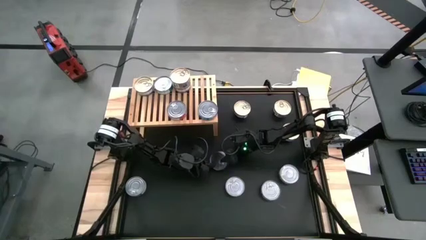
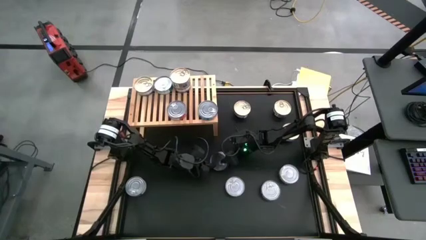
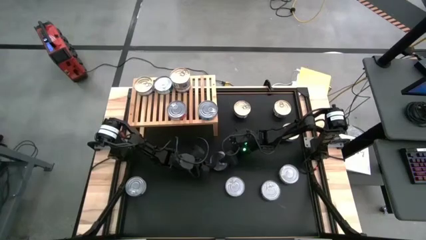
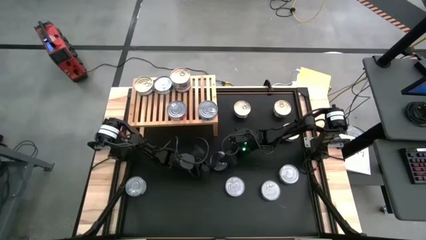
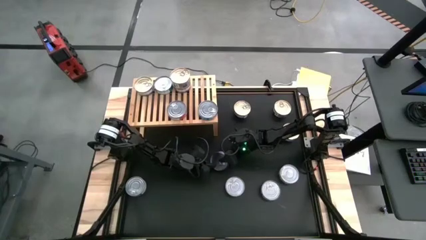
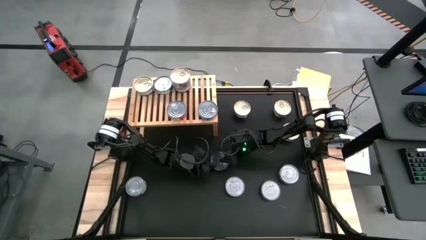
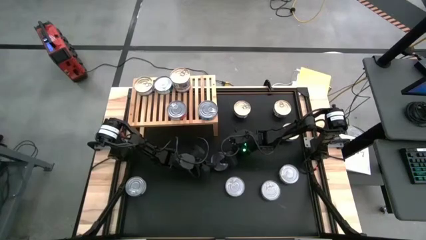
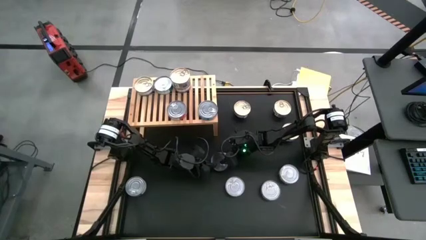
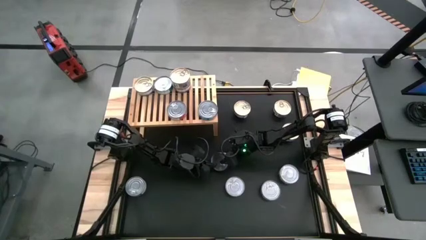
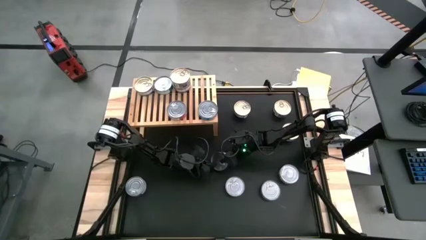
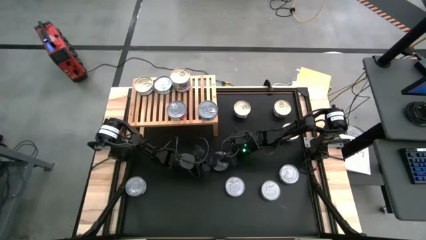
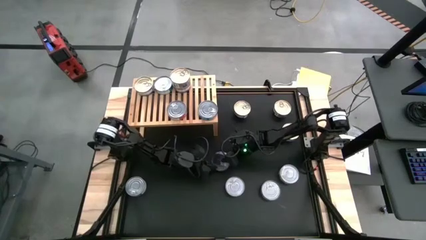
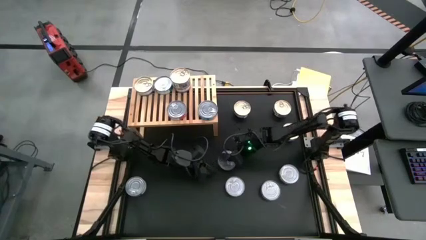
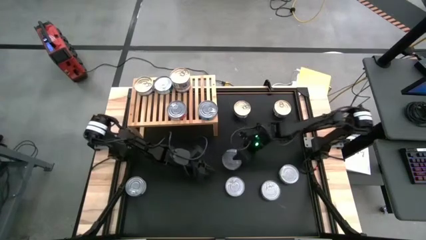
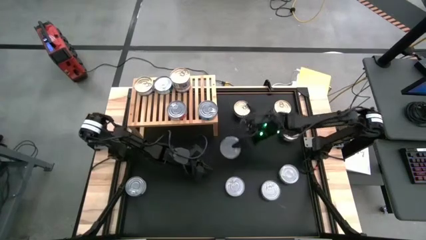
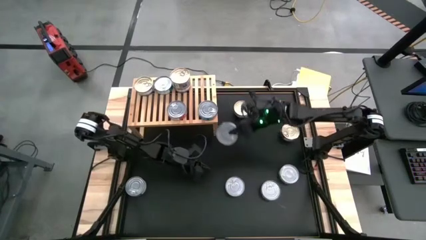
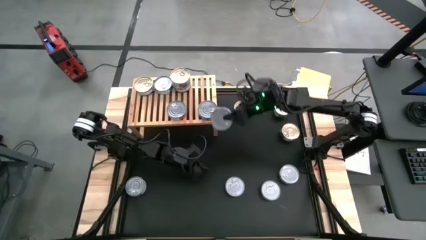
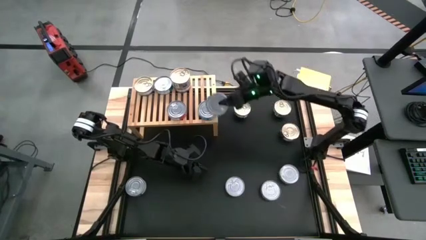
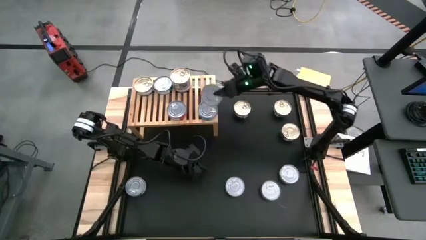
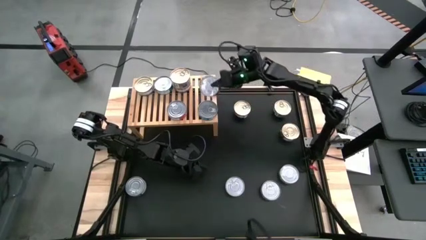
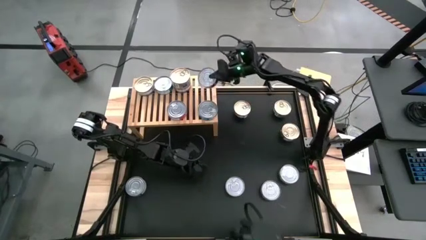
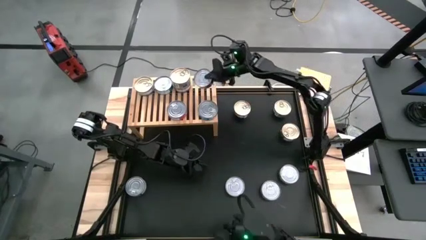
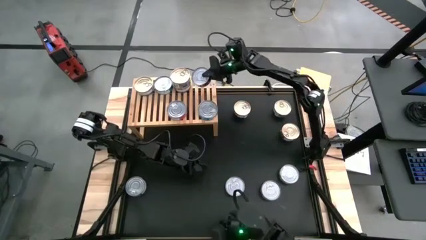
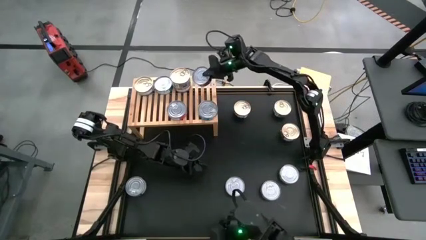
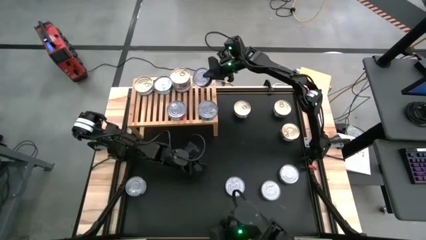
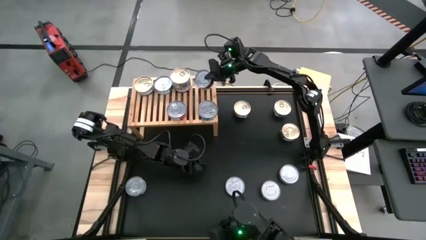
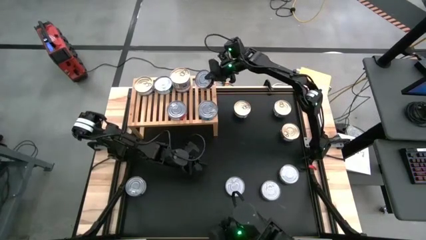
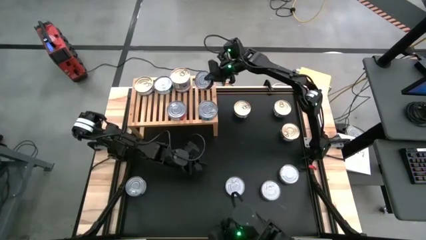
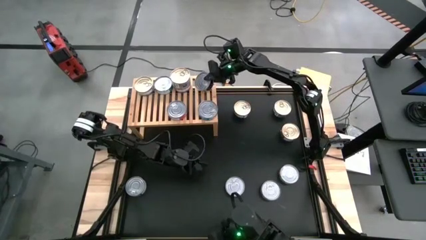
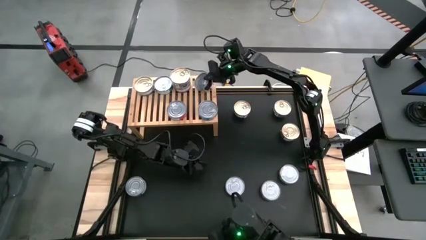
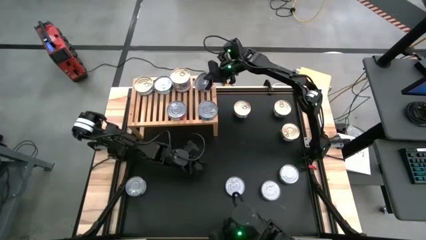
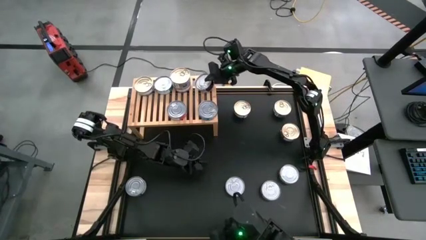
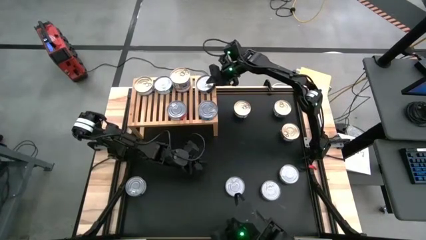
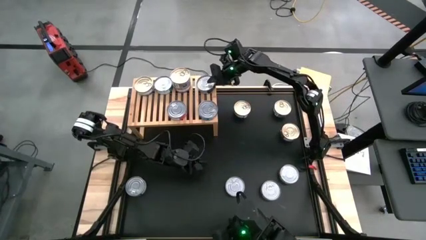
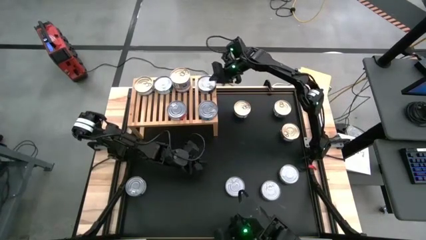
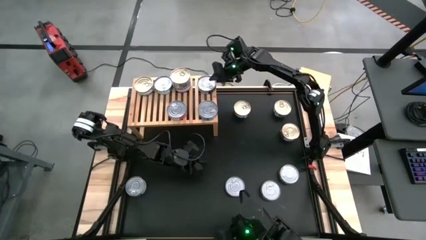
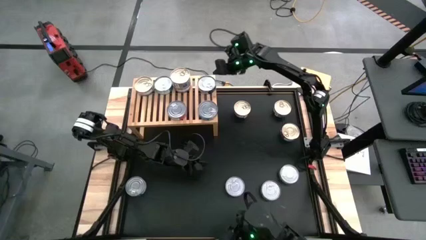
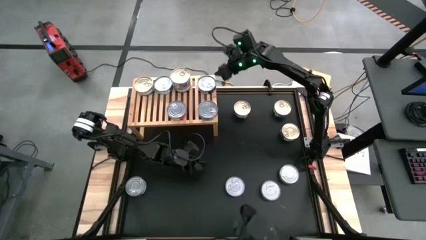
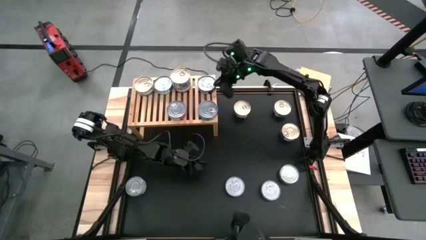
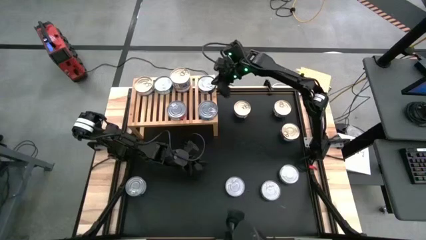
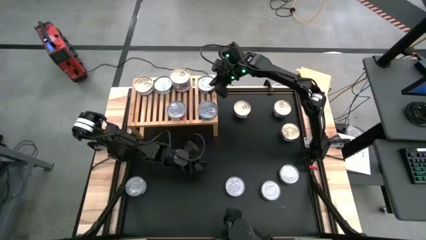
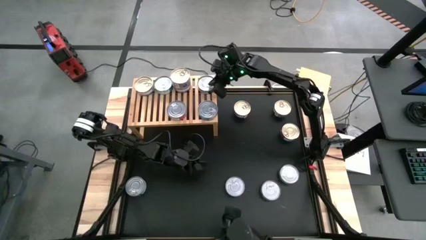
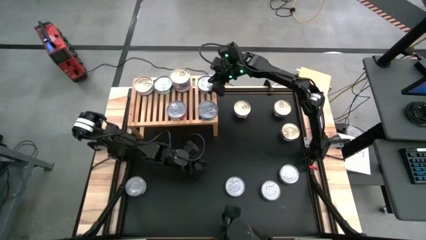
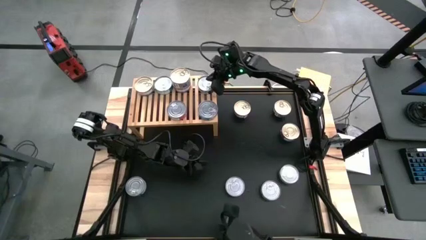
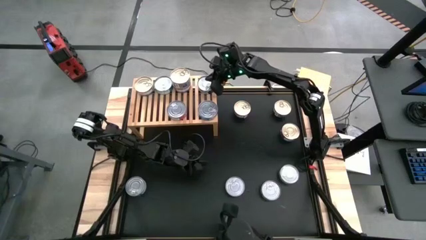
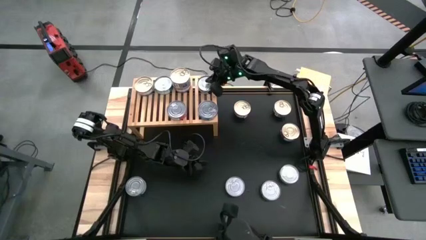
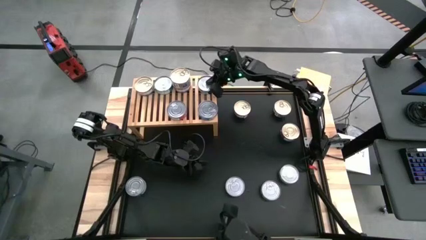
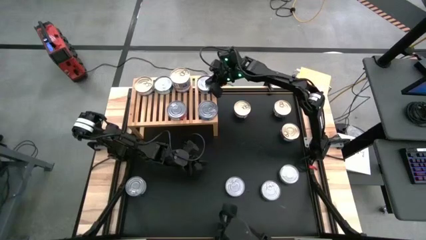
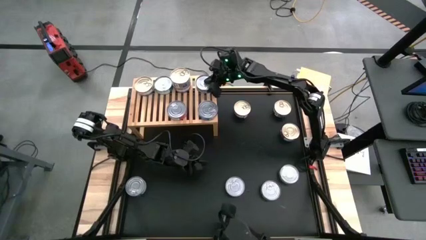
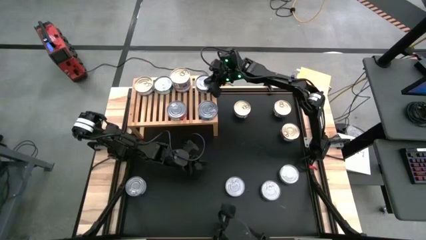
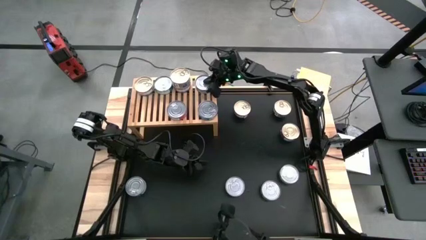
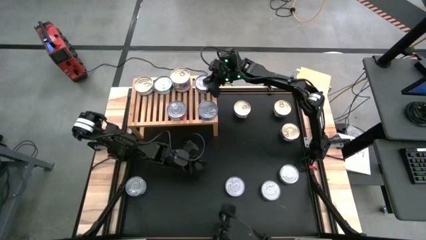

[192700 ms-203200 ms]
Task: Stack canned seafood by type on shelf
Put the top blue tuna can on the shelf

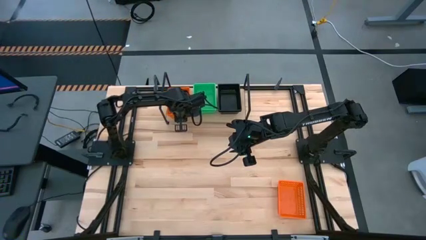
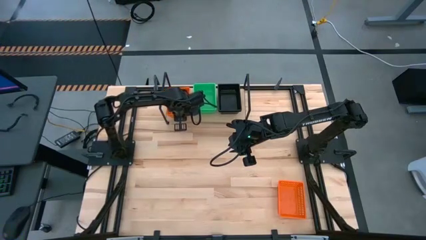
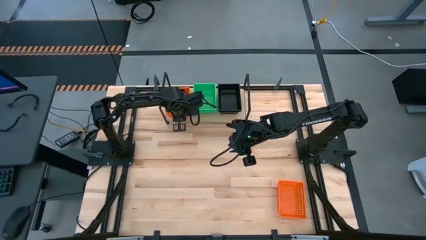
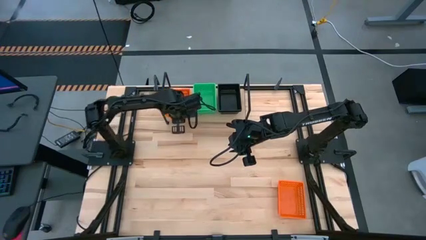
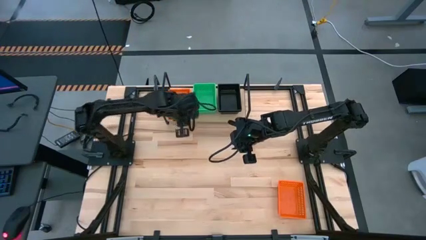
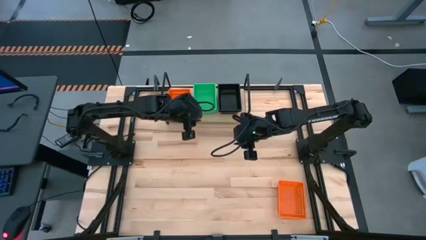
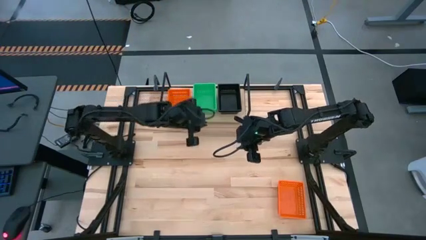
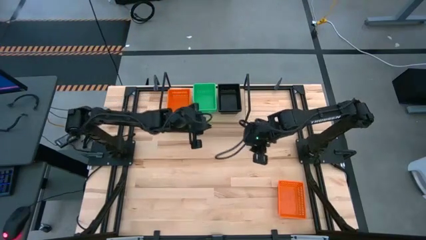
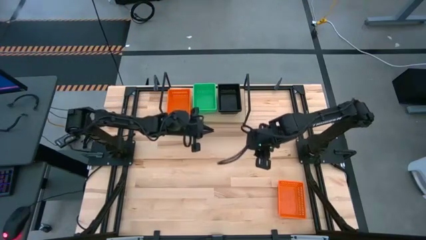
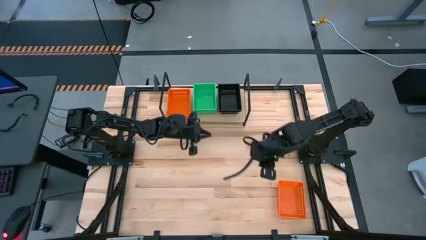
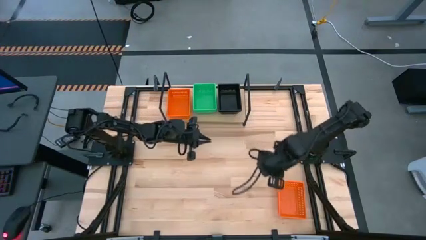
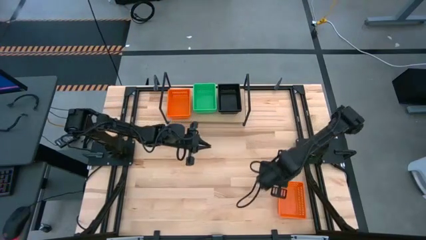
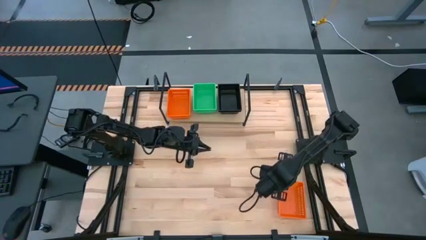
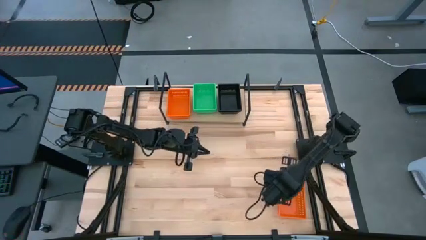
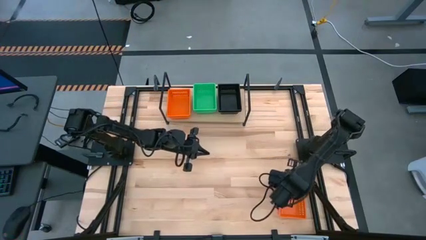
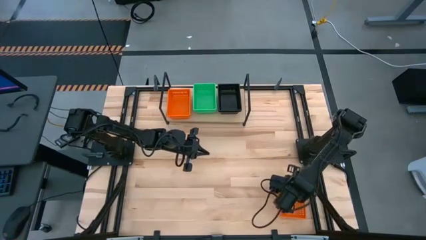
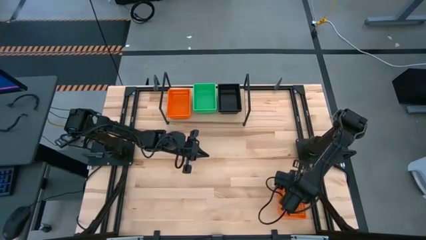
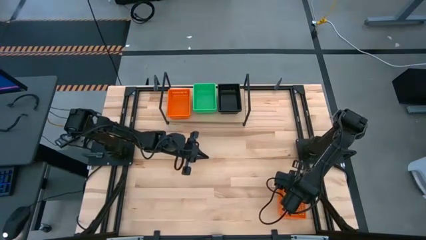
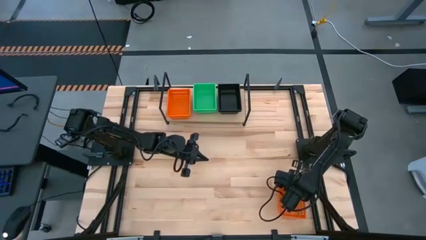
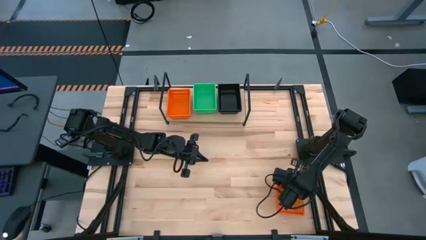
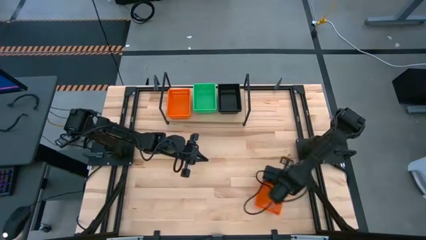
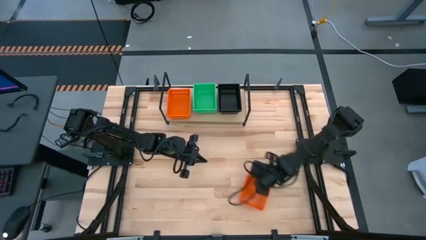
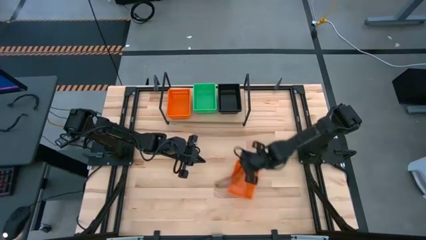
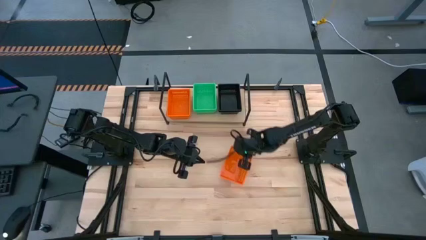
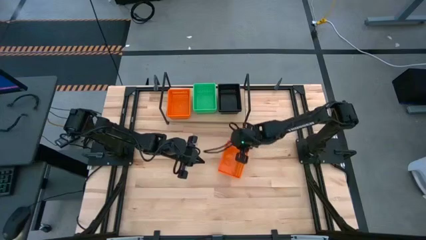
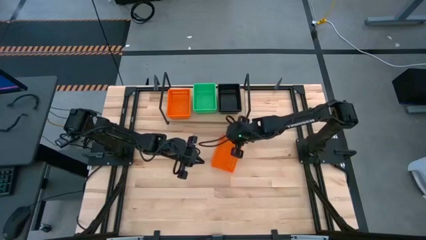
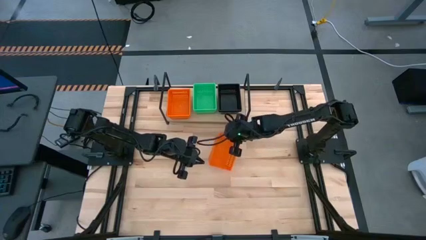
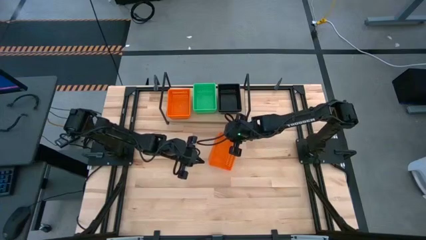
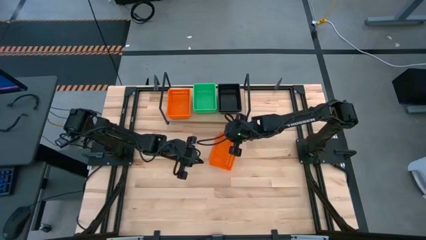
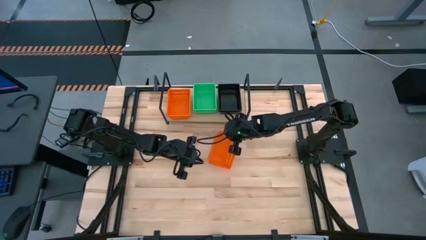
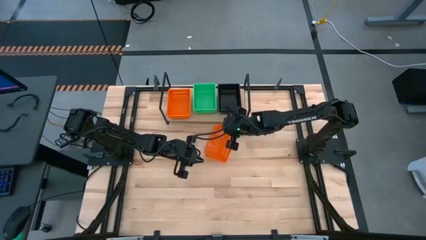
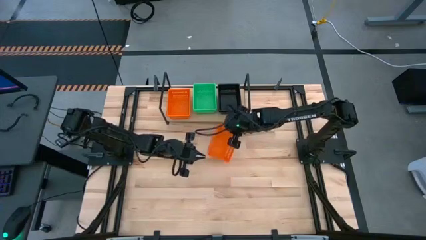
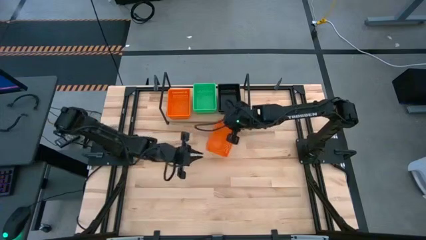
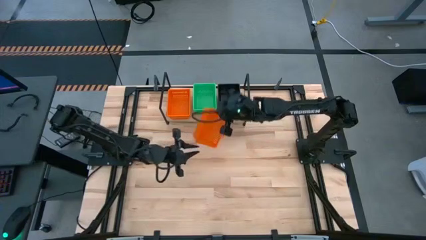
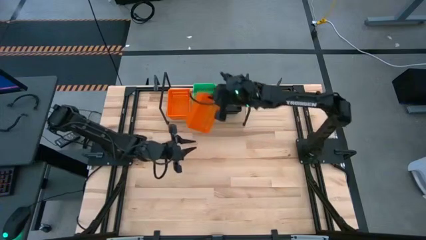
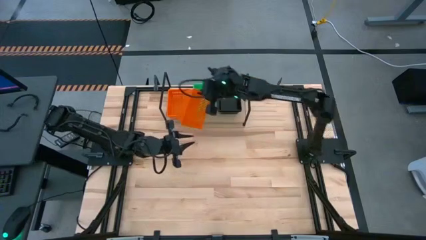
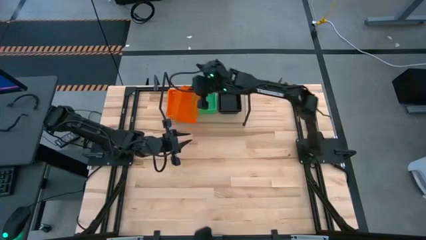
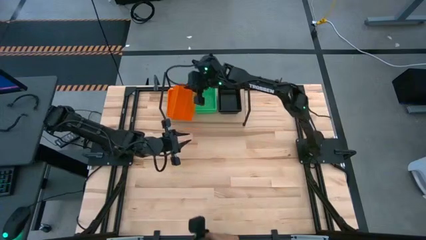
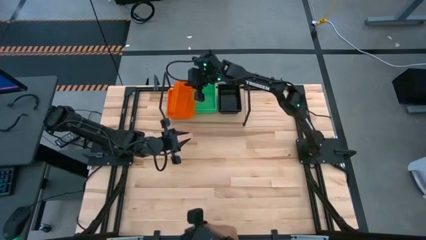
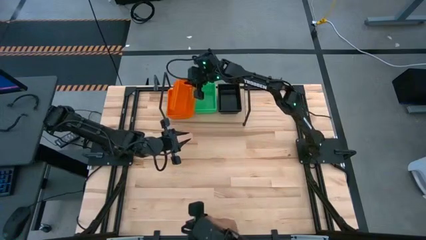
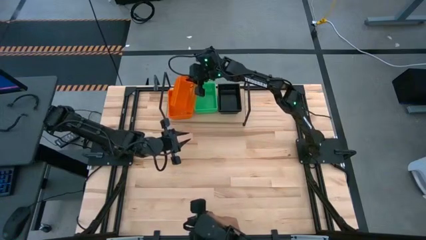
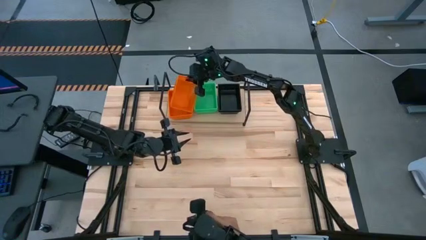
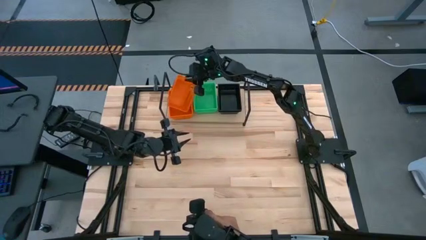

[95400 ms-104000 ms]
Task: Stack baskets on shelf by color
Stack the orange bin on top of the stacked orange bin on the shelf
